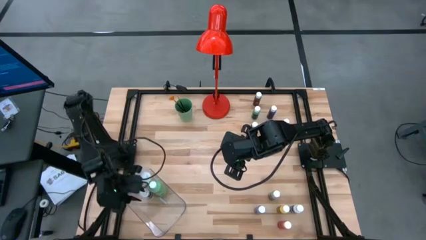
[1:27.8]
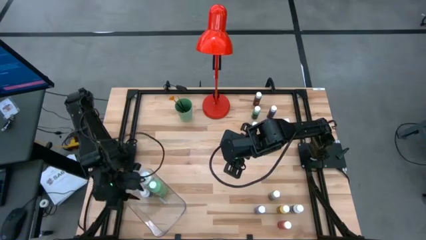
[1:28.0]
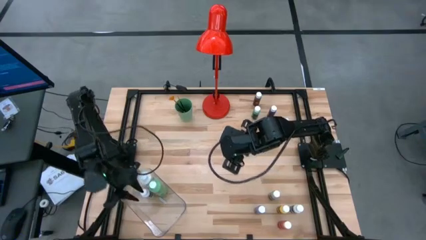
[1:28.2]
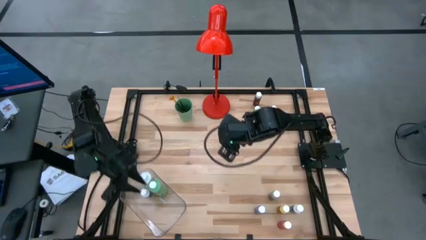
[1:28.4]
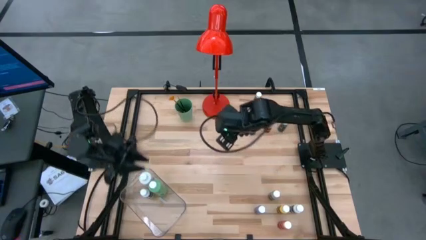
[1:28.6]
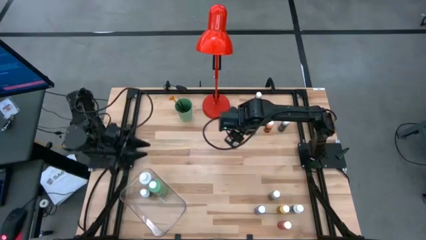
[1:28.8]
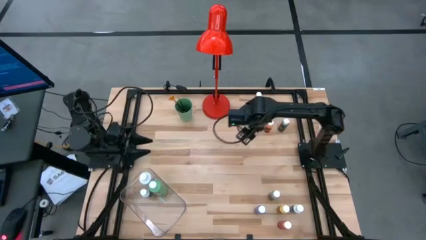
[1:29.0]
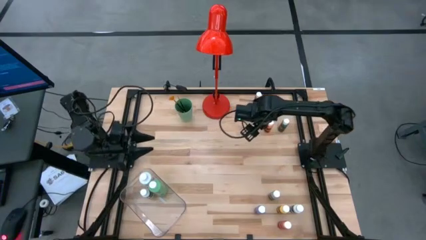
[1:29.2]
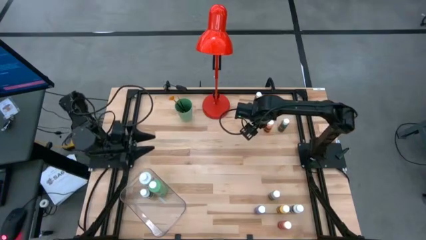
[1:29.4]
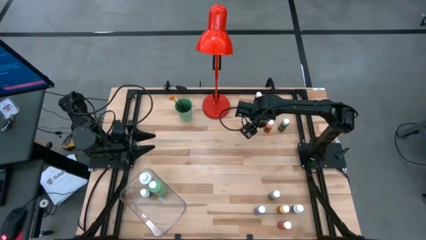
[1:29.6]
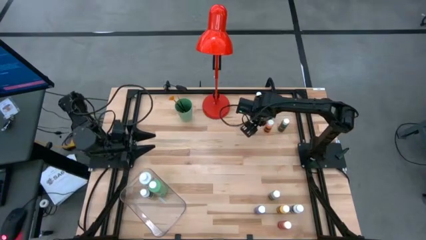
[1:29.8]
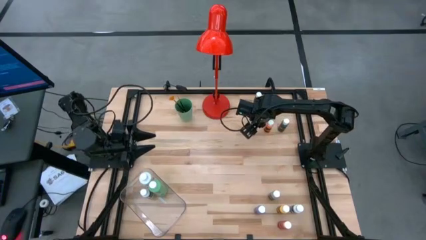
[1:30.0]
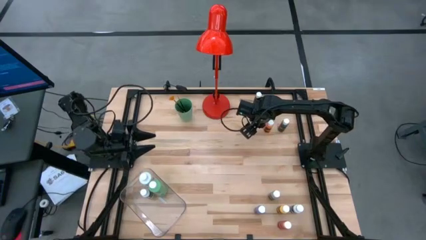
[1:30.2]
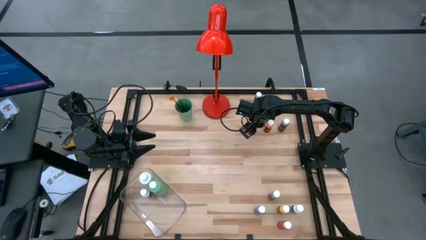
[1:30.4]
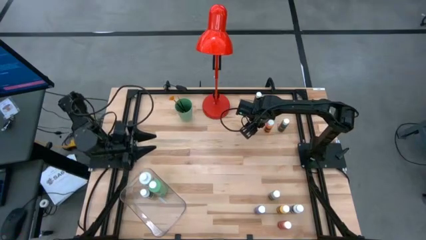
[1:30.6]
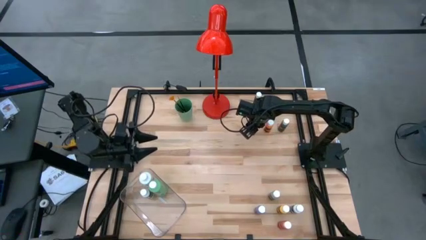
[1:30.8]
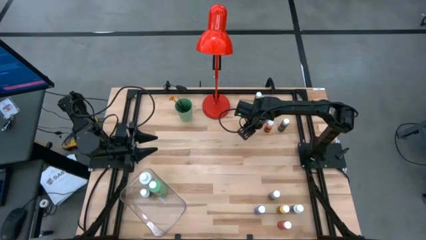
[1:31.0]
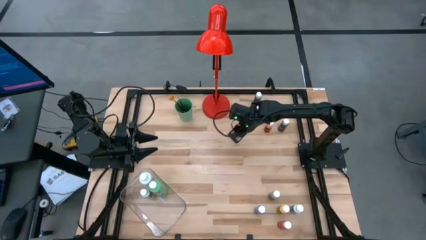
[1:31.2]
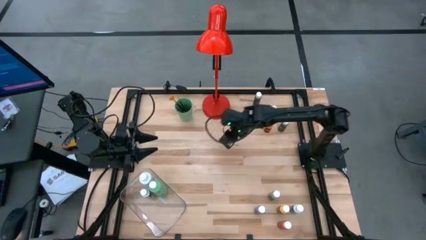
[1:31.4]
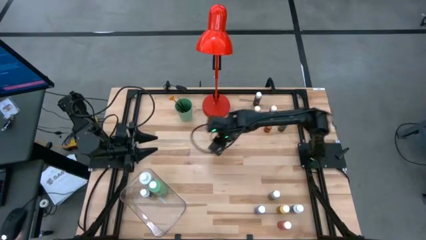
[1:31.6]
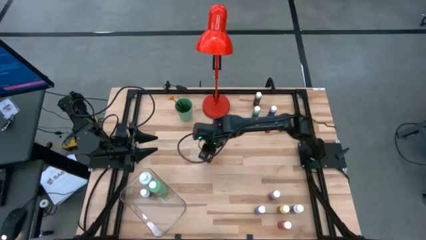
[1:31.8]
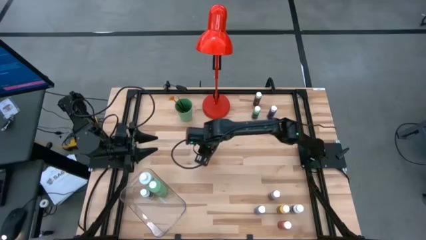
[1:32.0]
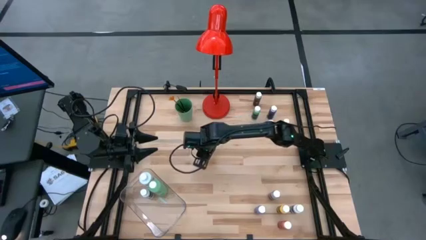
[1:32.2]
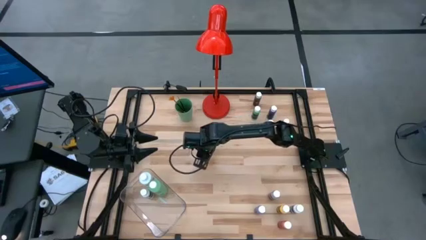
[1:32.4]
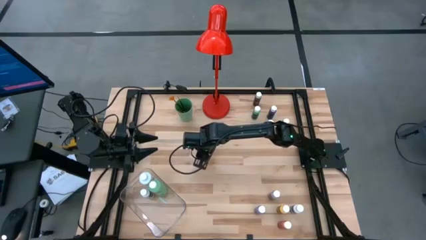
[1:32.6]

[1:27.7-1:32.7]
Task: Pick & Place Paint Supplies
Move the black coloring bottle to the center of the table

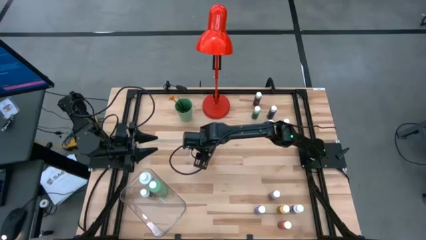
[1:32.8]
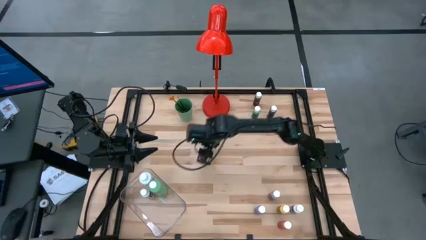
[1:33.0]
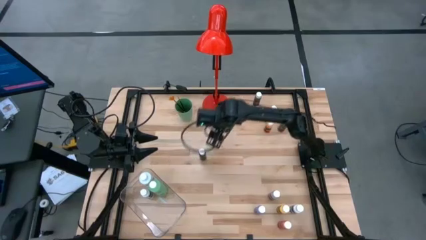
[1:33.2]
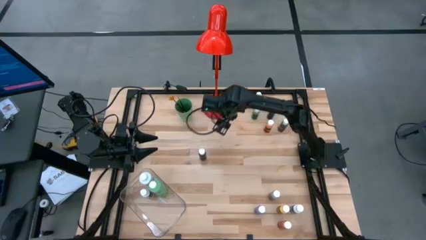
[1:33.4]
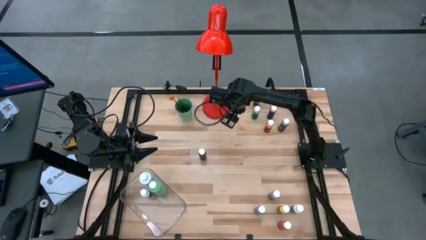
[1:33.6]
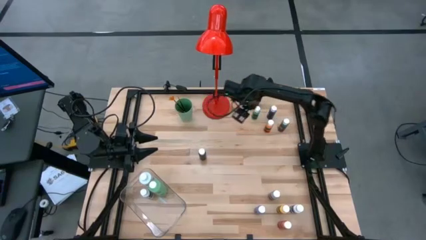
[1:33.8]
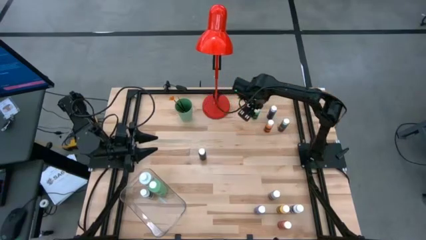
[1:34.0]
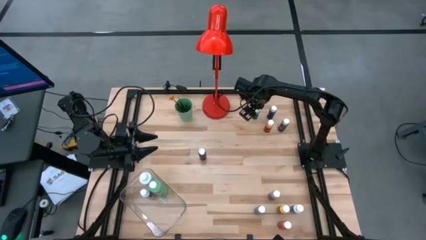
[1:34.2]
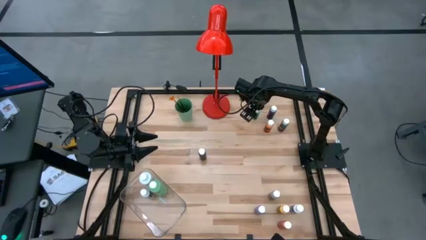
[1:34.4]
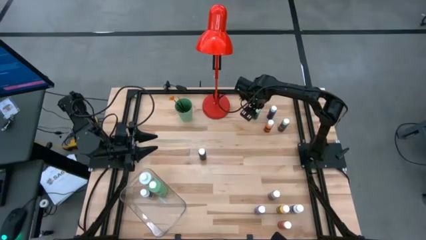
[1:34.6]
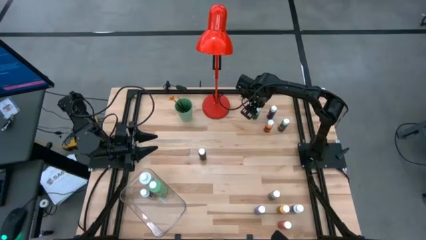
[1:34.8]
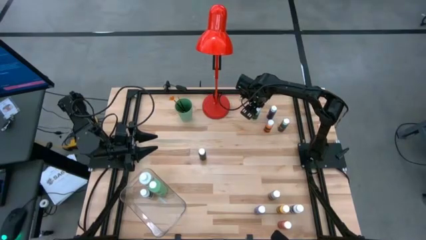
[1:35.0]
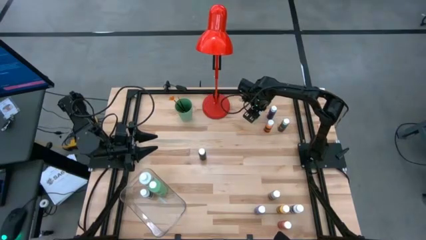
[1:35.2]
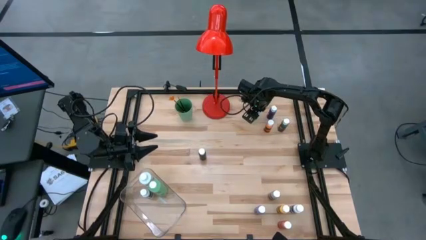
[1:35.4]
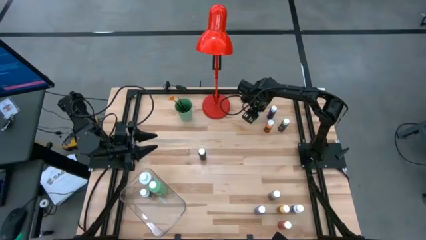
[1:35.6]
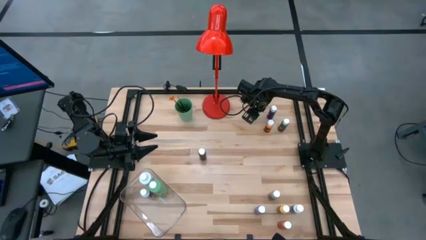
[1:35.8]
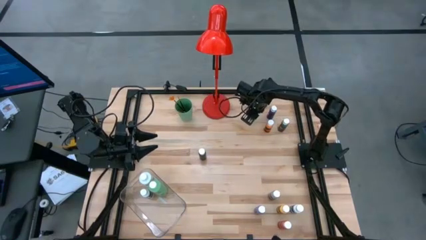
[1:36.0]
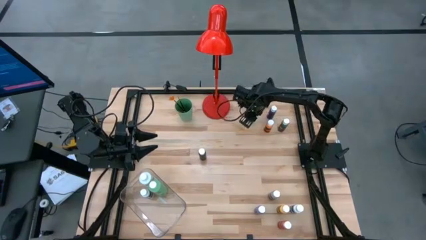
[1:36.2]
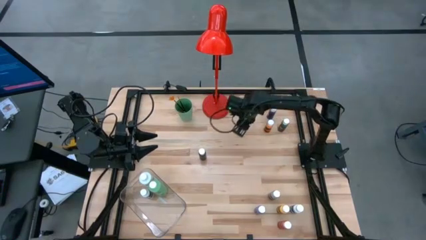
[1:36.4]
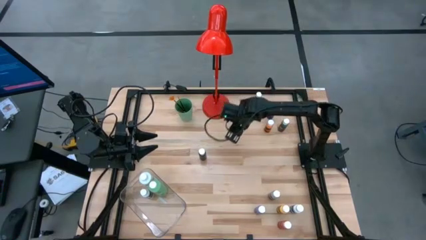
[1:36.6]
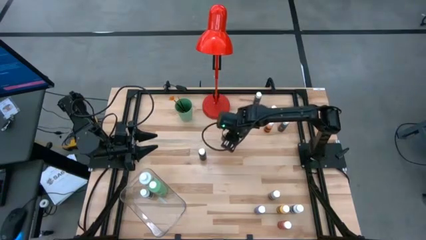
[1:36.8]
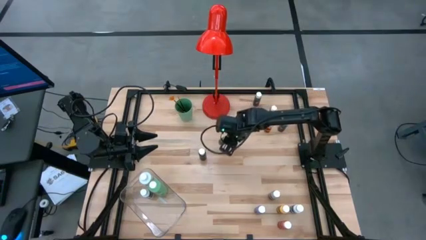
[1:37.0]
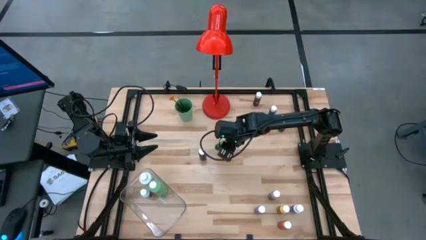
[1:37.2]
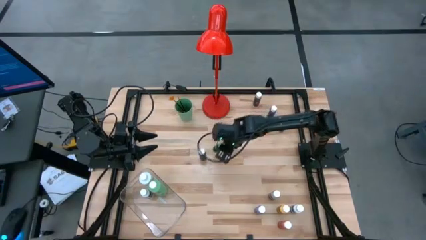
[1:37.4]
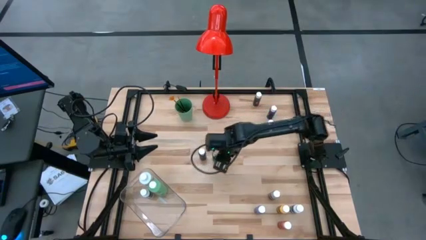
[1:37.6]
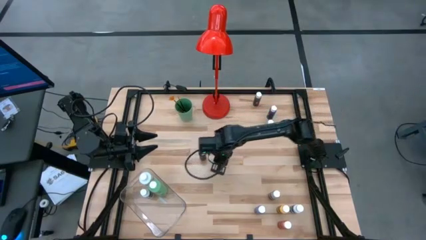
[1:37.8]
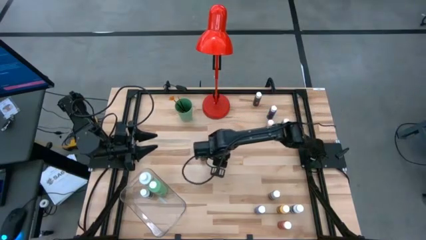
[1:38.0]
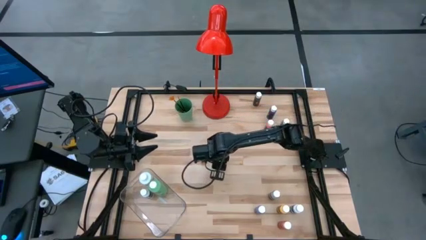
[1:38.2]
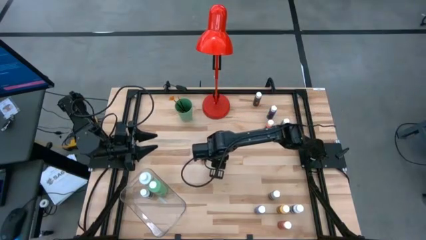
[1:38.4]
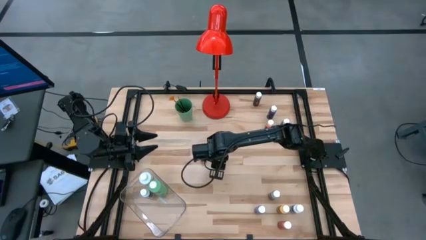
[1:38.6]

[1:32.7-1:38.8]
Move the green coloring bottle to the center of the table

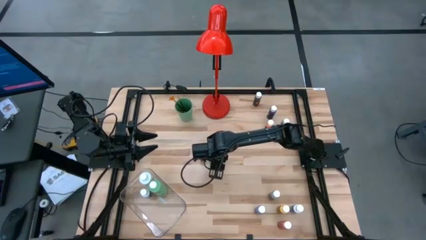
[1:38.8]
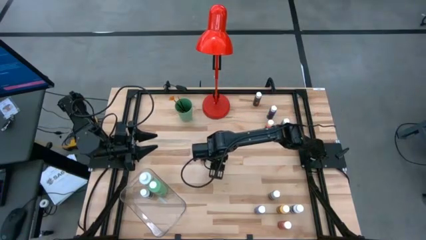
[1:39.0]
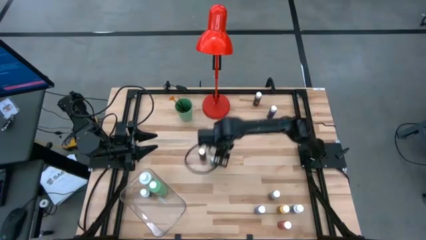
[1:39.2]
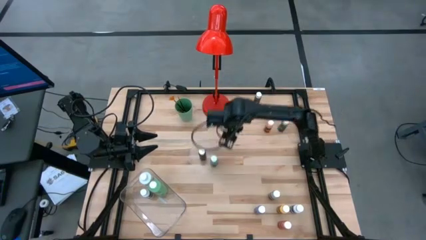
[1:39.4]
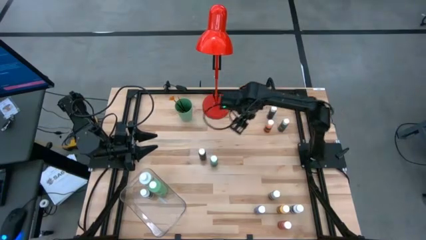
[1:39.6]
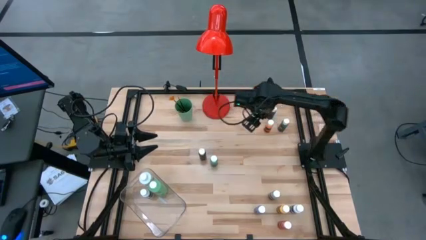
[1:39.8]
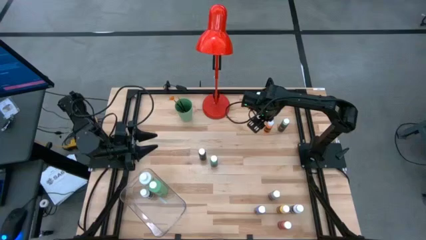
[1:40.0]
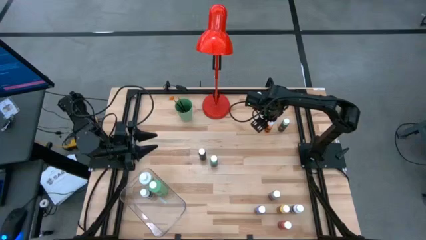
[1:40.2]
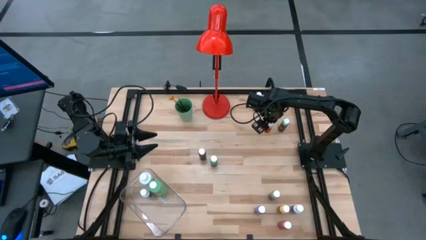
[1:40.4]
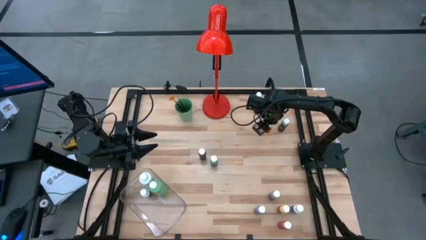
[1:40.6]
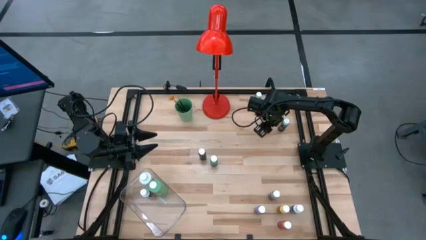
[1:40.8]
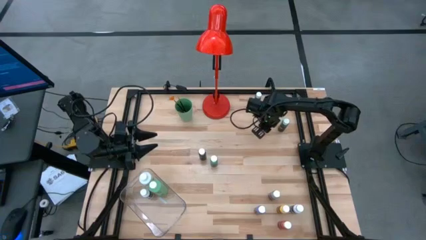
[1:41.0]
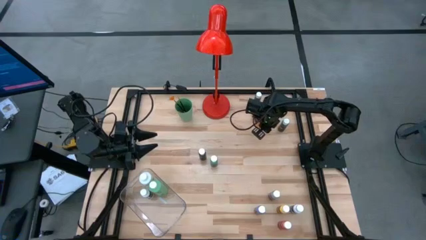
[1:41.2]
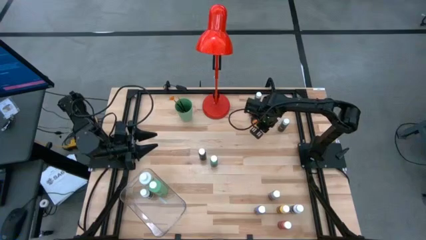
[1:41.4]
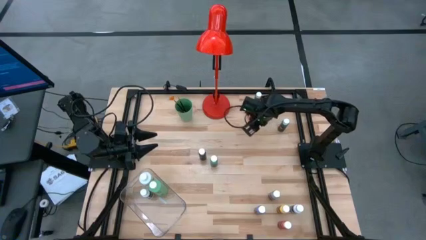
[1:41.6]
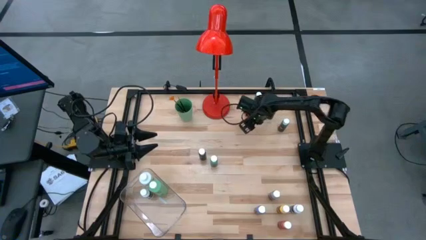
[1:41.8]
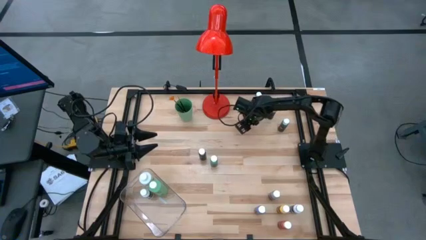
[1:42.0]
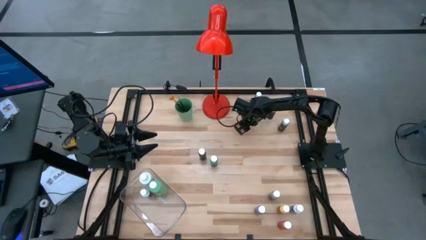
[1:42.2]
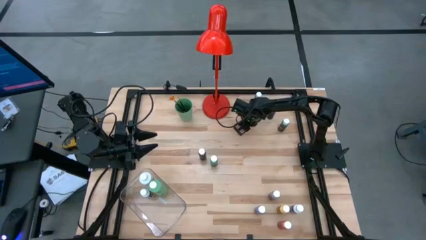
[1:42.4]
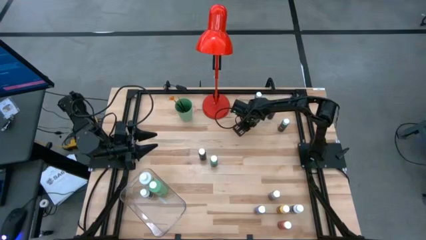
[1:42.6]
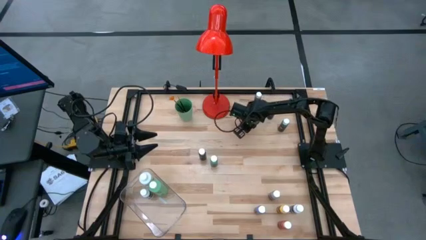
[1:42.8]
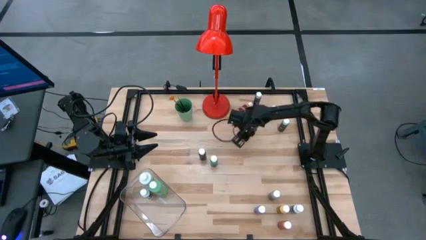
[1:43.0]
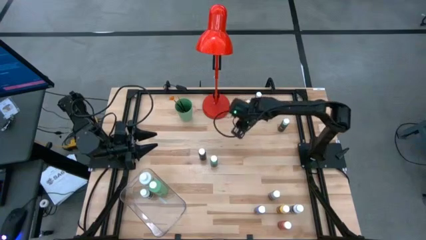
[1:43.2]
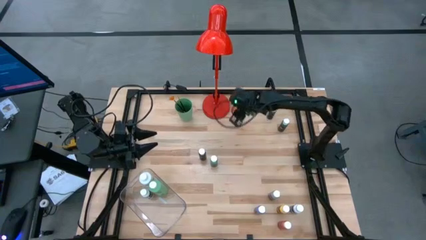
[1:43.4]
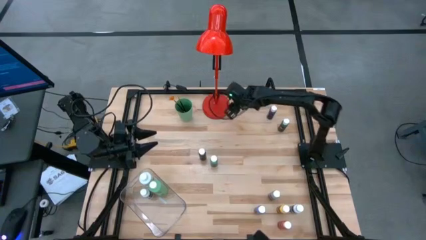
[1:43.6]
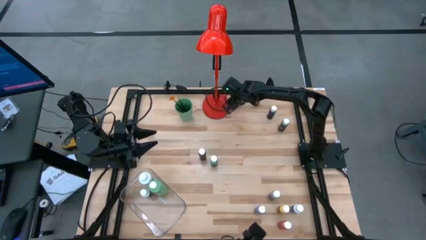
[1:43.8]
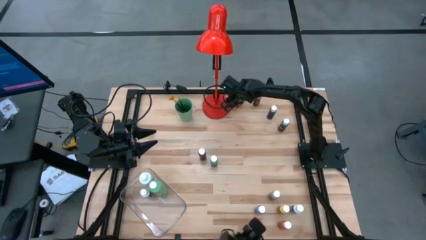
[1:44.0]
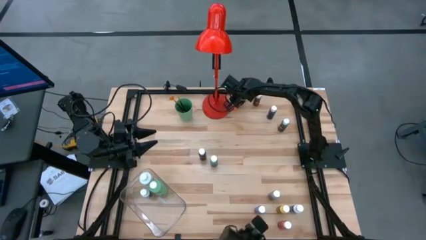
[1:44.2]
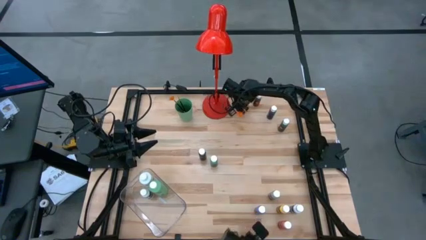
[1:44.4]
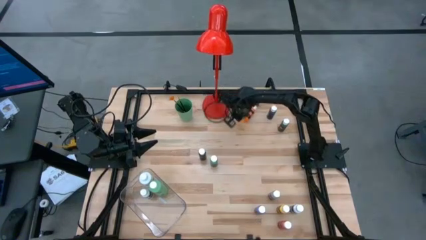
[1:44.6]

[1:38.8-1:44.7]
Move the orange coloring bottle to the center of the table
